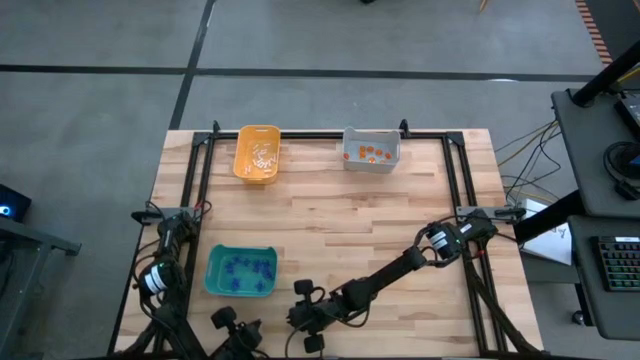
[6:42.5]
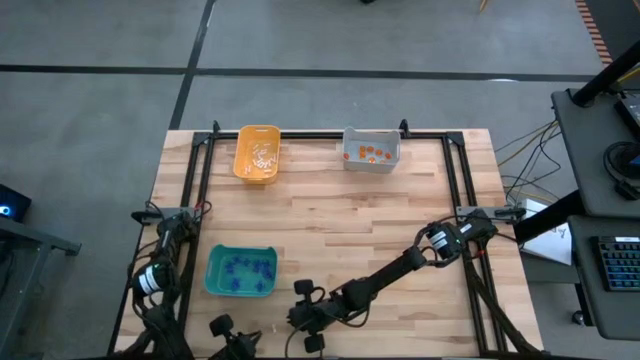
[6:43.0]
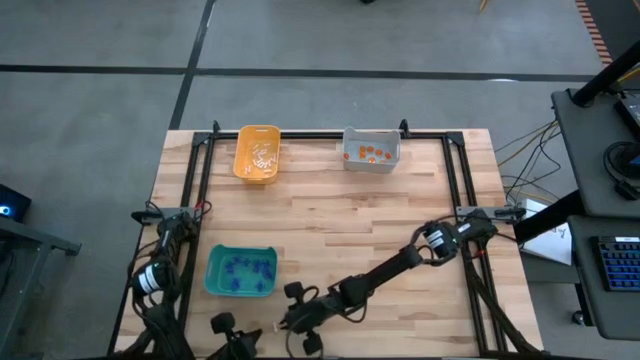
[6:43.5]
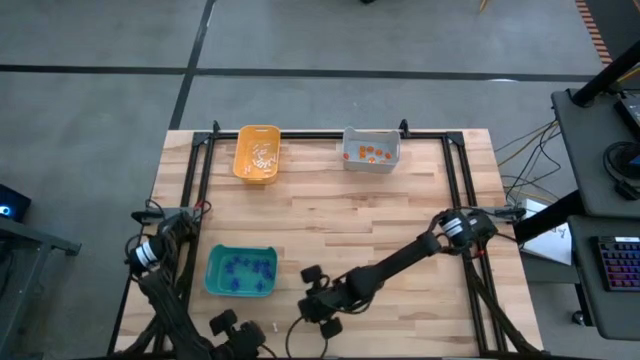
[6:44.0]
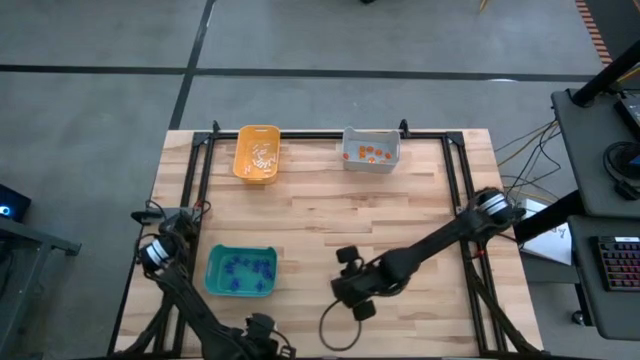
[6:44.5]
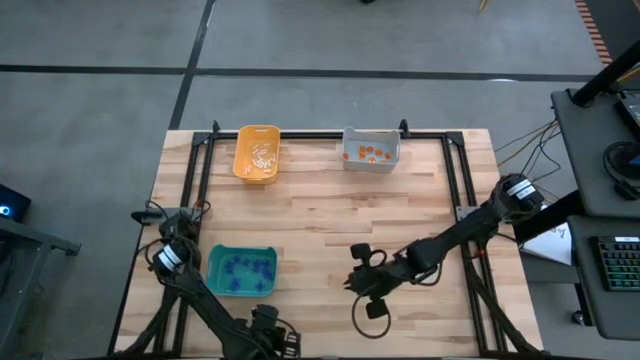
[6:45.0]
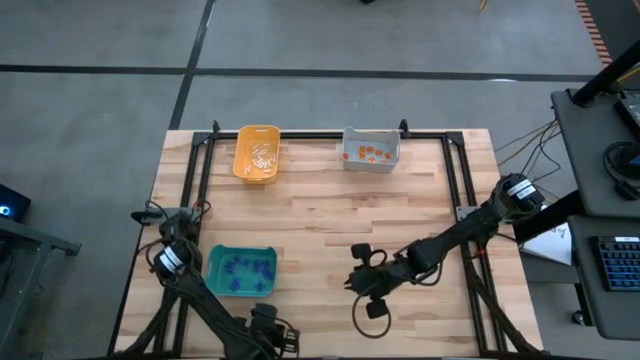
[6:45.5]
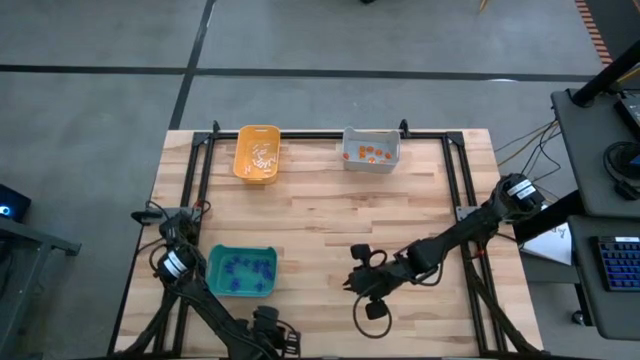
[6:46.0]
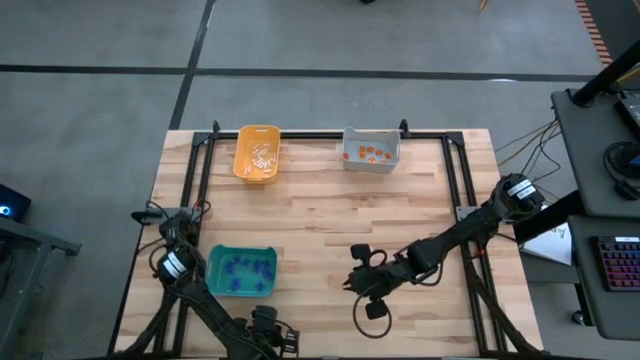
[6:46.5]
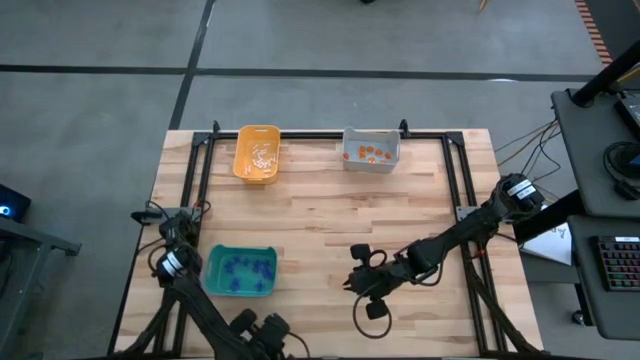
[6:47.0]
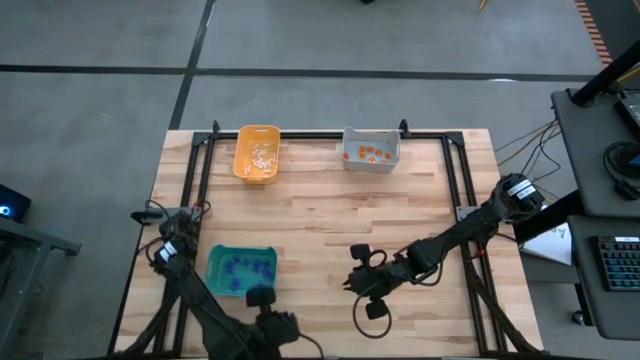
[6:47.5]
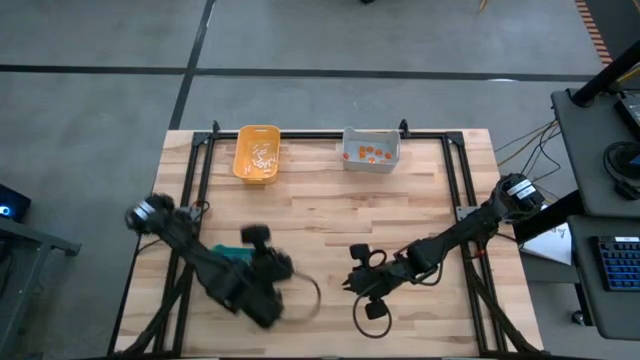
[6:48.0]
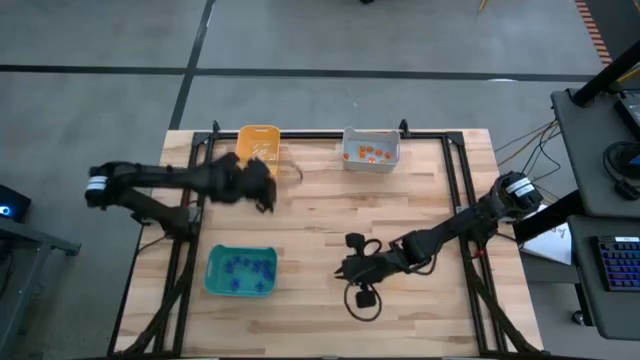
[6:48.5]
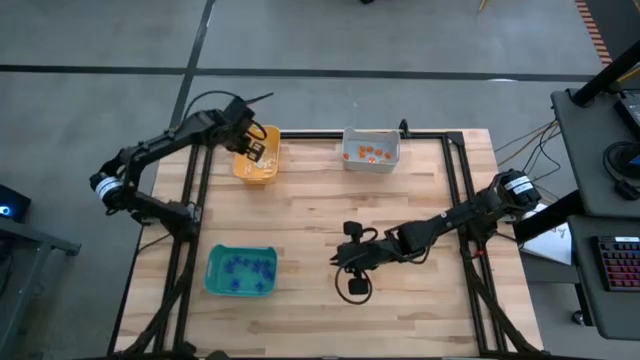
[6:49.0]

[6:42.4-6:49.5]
Task: Sort Halloween decoration
Put the white bone toy into the orange bin

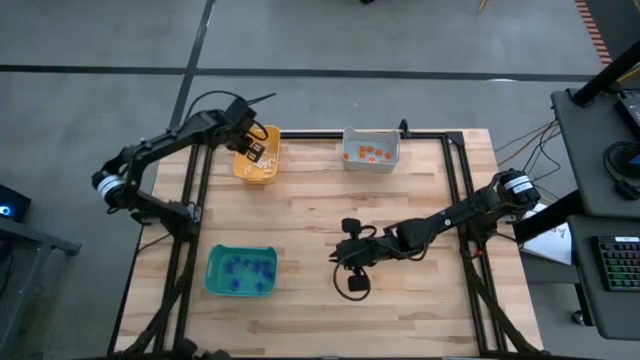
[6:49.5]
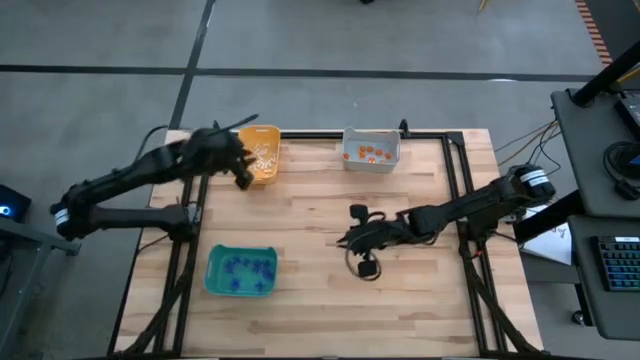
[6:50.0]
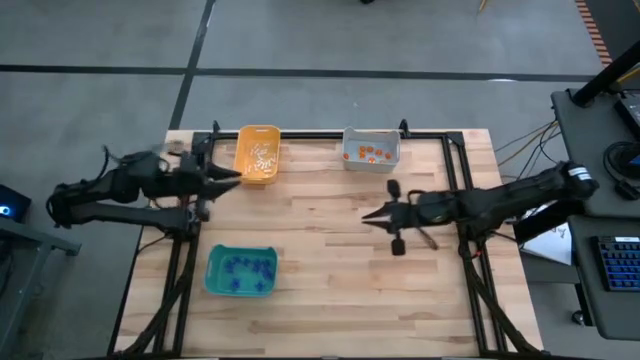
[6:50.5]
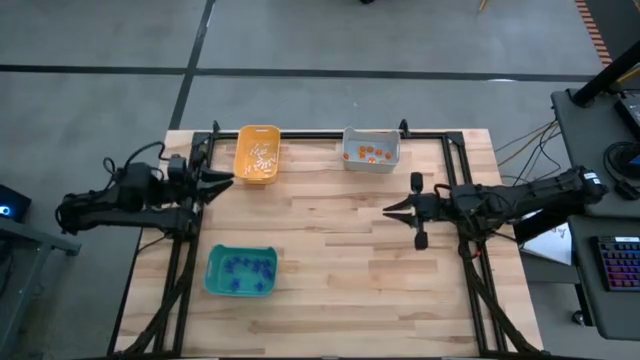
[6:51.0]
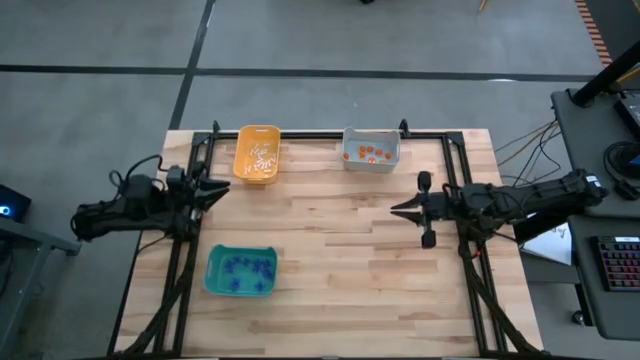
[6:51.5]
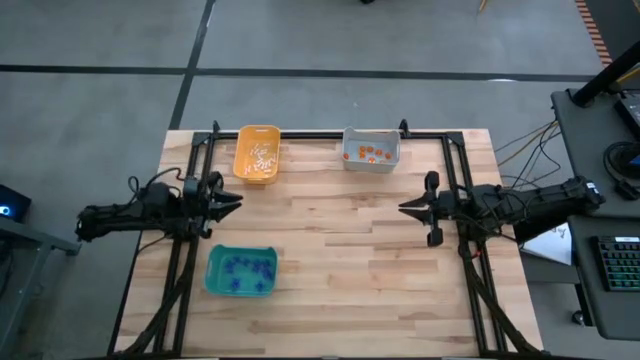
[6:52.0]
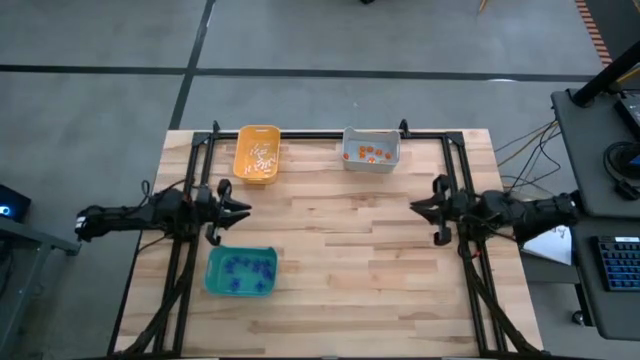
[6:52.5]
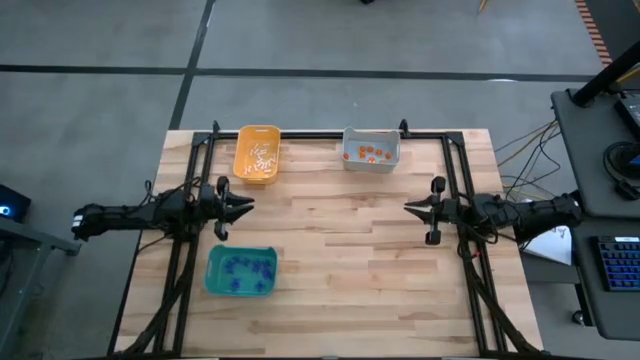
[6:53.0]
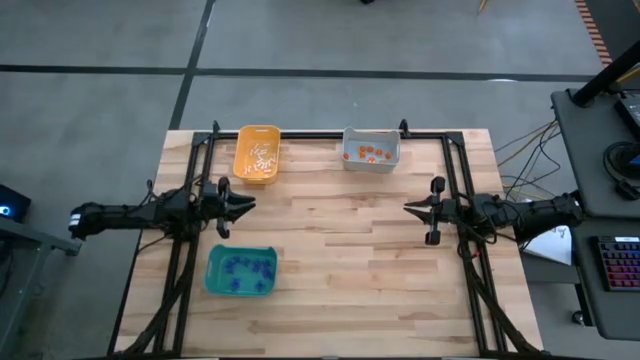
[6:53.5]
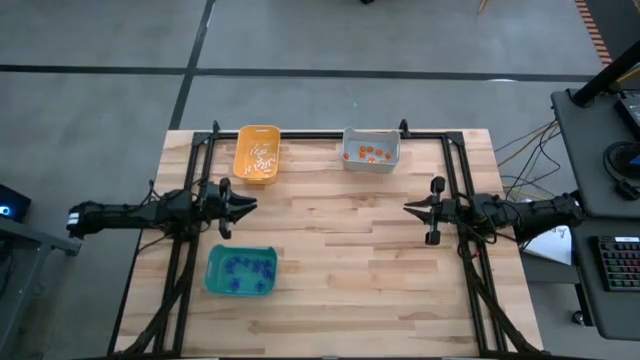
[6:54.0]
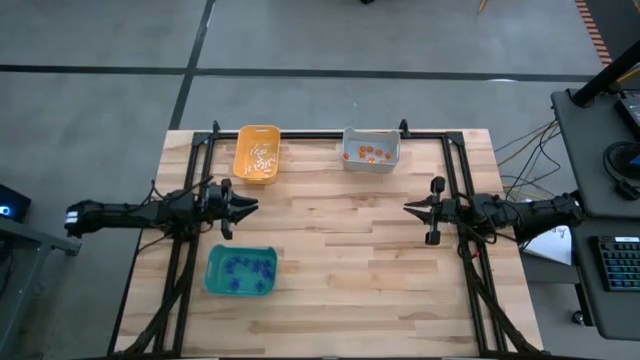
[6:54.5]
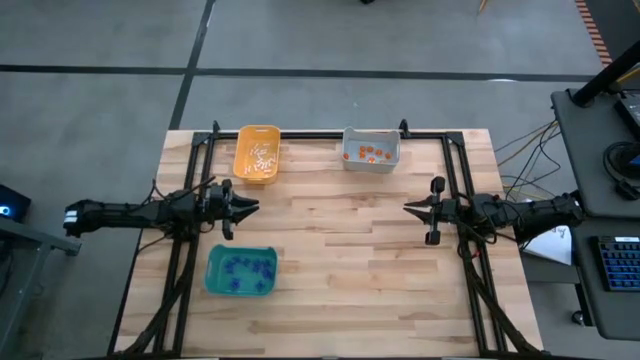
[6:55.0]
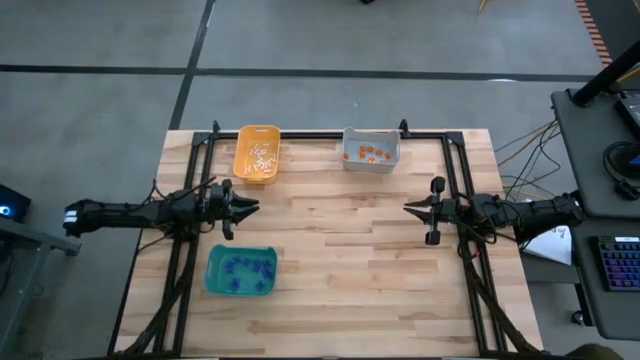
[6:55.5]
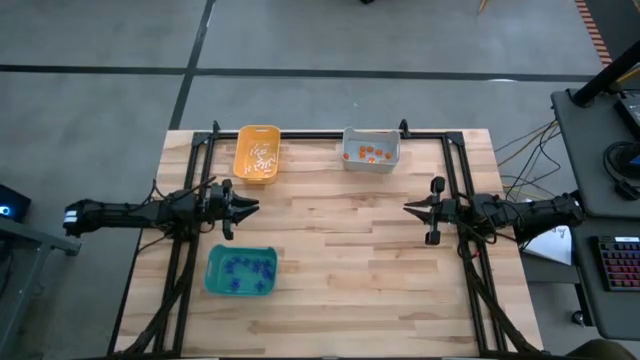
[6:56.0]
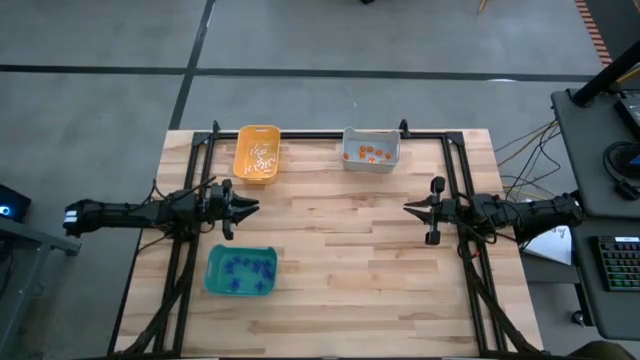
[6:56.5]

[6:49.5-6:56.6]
Return to Home Position
